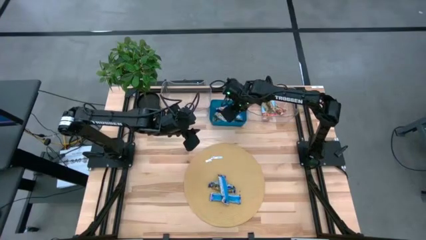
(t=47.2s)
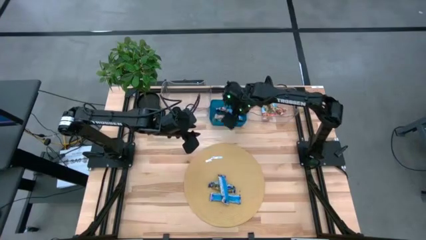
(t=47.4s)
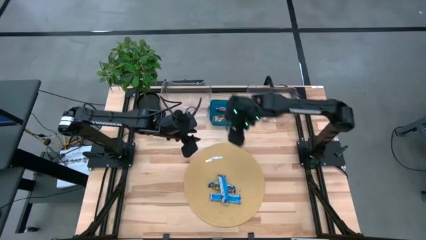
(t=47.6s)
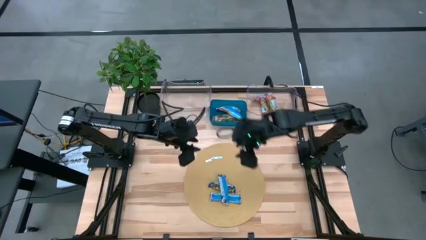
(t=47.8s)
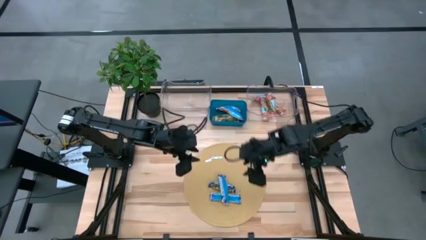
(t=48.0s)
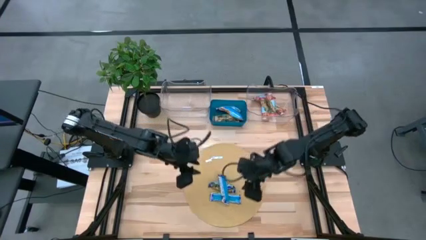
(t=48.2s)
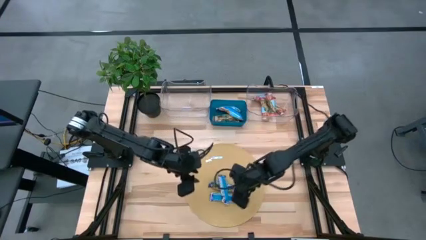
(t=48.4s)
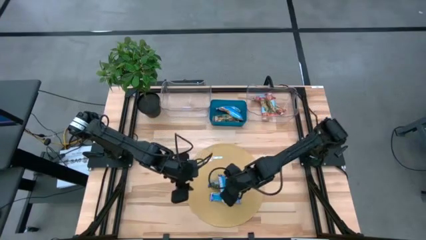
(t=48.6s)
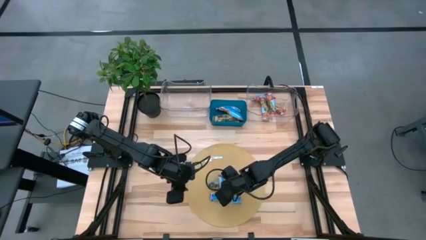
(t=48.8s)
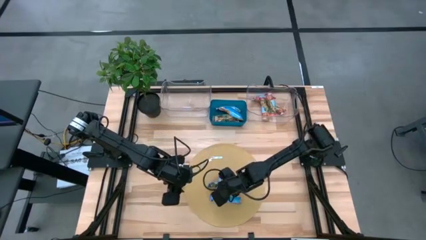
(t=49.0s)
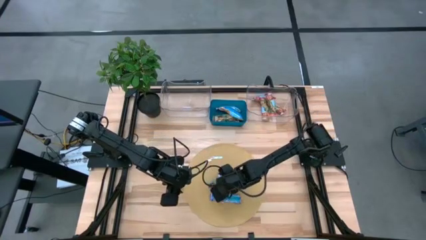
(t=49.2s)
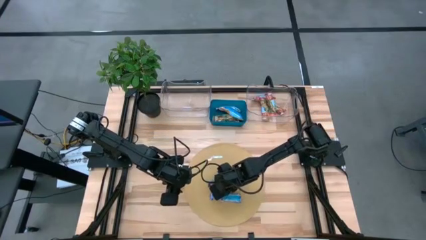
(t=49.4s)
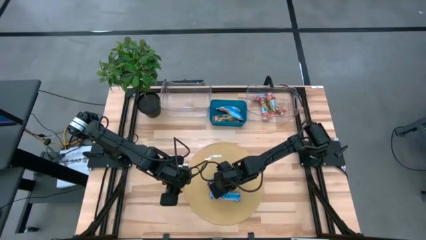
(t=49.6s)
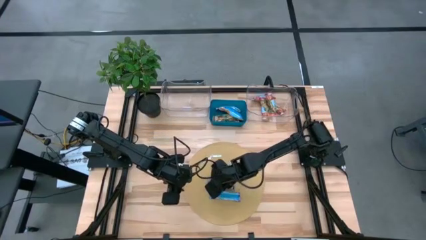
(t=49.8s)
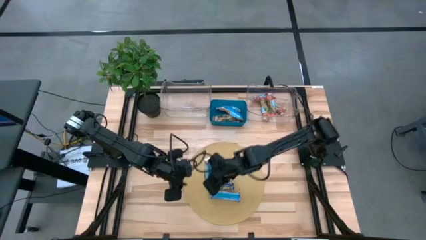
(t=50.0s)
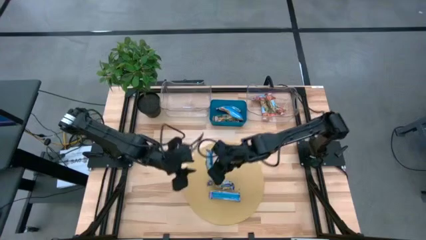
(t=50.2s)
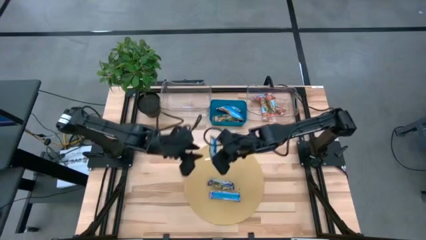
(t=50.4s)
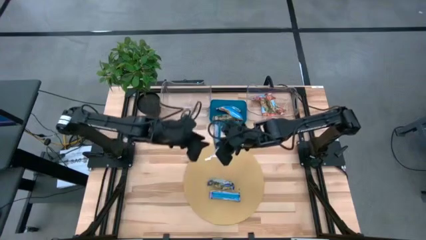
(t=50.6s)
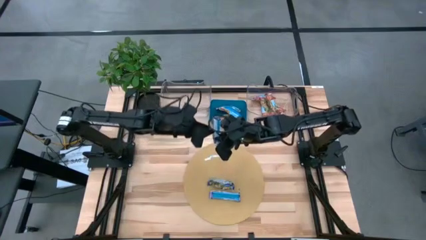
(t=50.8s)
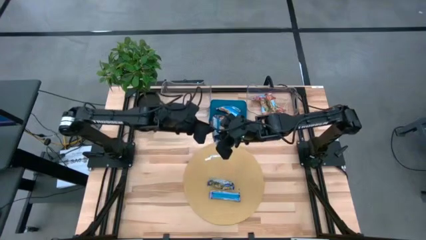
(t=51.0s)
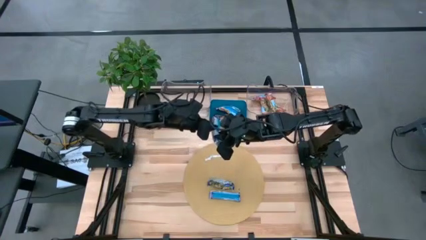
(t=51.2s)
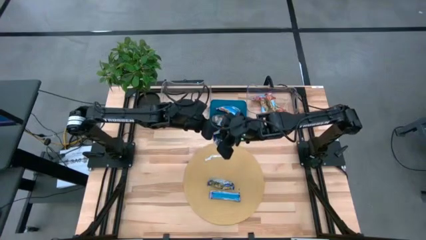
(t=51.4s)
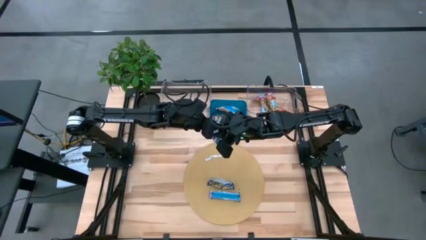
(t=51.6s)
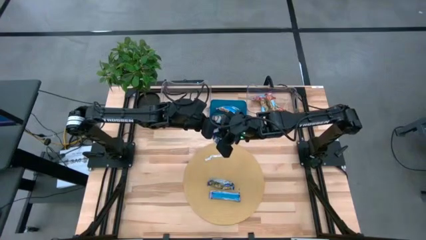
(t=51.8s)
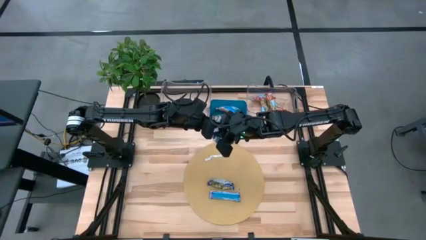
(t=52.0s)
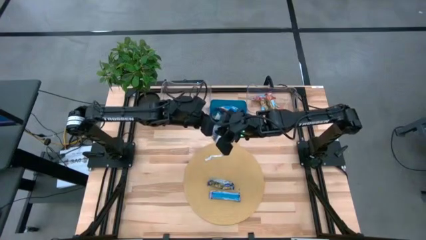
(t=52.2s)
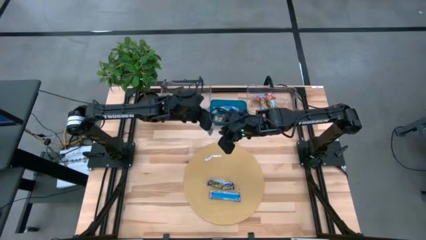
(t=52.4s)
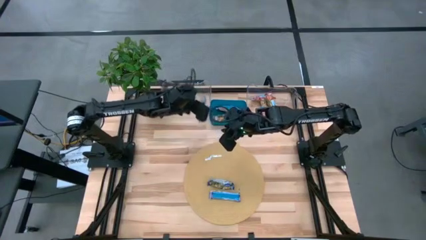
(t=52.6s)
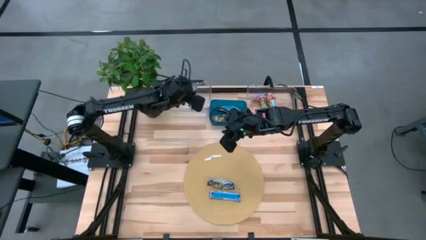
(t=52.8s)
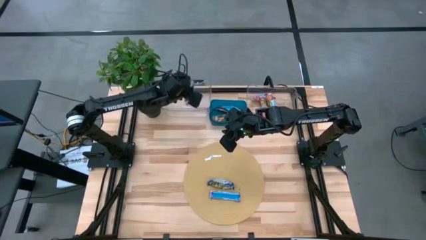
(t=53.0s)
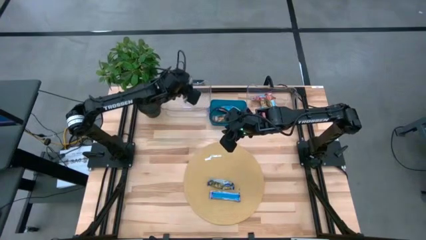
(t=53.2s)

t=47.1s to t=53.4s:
Task: Pick and place Granola Bars by type
Put the blue granola bar into the left transparent bin

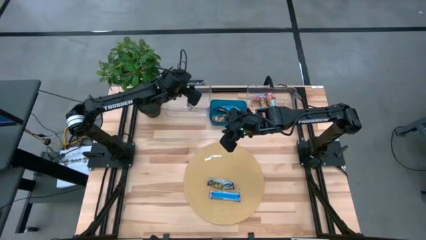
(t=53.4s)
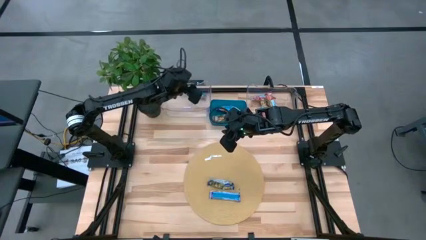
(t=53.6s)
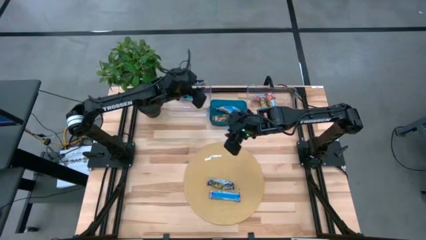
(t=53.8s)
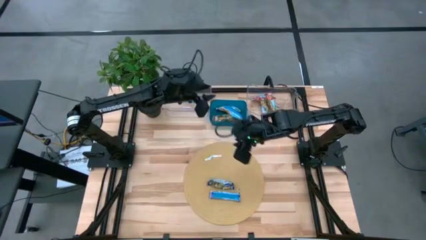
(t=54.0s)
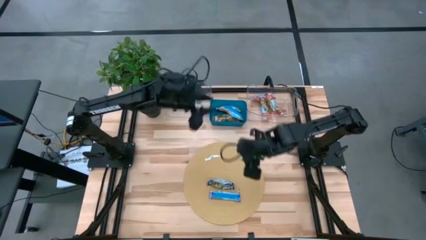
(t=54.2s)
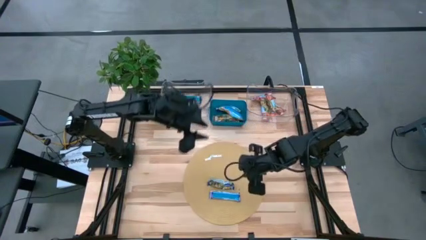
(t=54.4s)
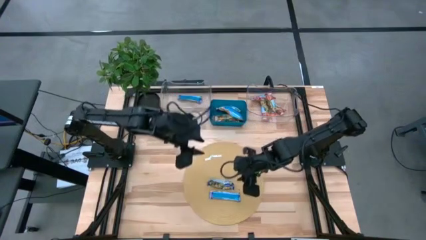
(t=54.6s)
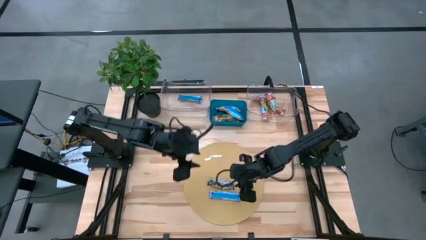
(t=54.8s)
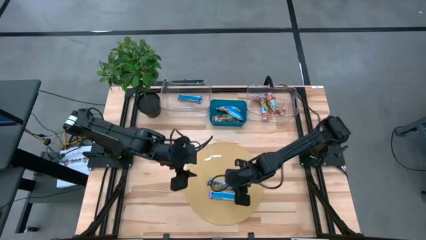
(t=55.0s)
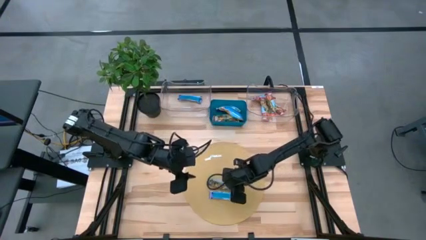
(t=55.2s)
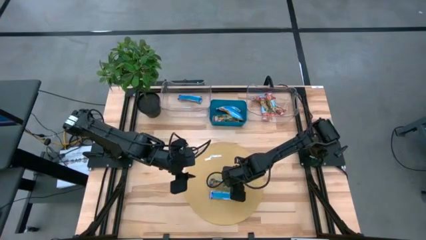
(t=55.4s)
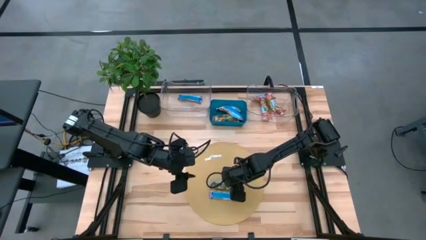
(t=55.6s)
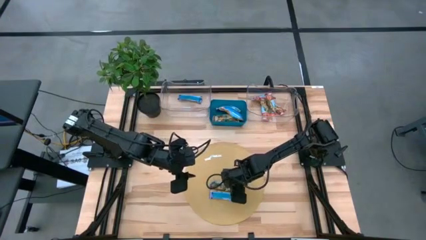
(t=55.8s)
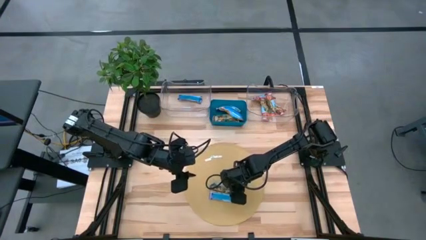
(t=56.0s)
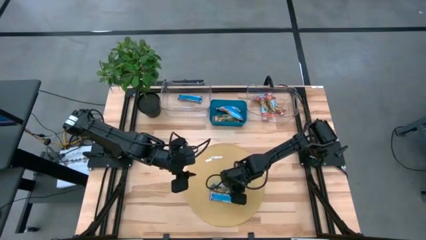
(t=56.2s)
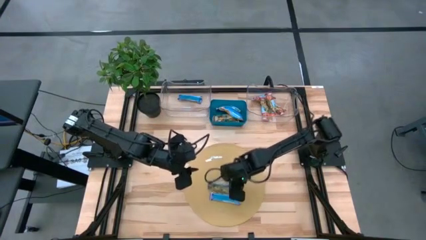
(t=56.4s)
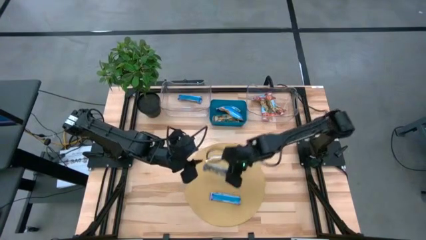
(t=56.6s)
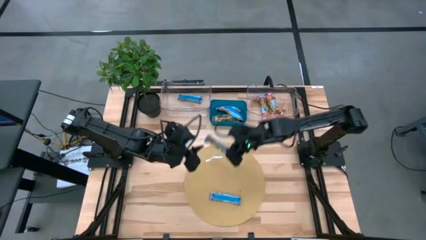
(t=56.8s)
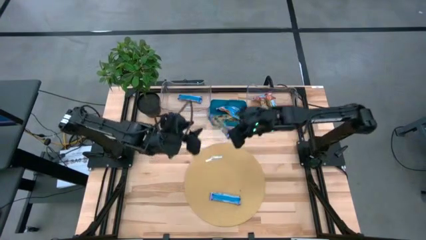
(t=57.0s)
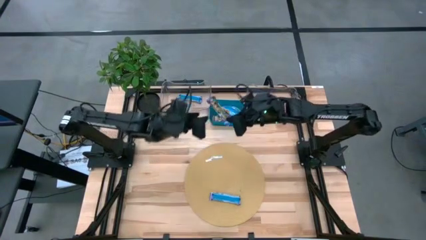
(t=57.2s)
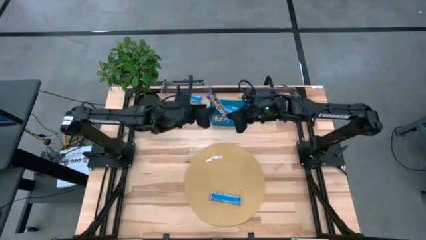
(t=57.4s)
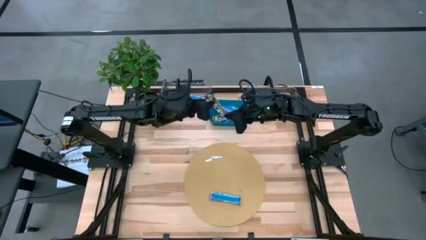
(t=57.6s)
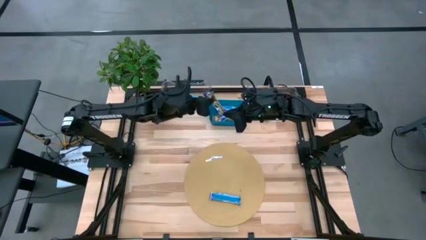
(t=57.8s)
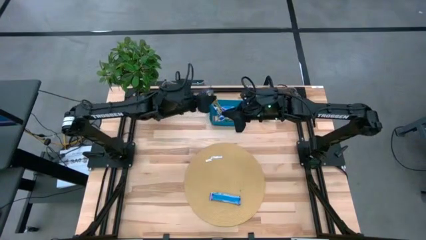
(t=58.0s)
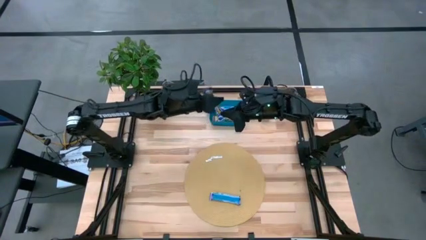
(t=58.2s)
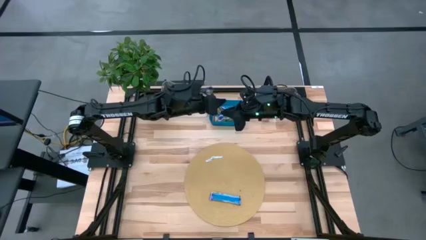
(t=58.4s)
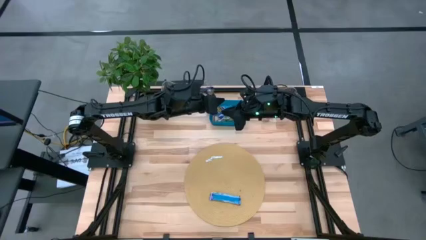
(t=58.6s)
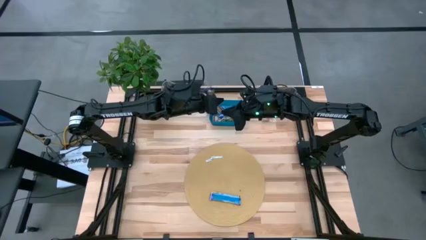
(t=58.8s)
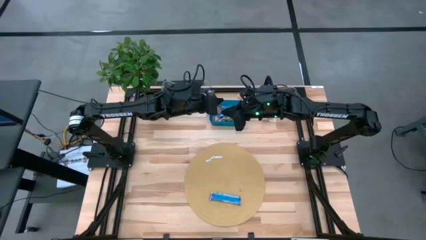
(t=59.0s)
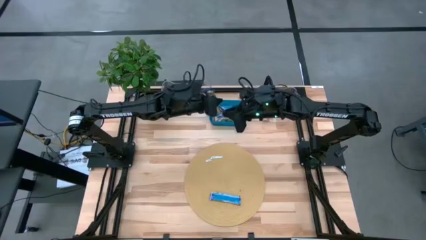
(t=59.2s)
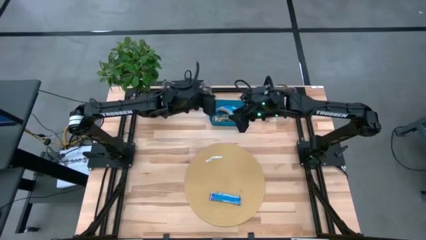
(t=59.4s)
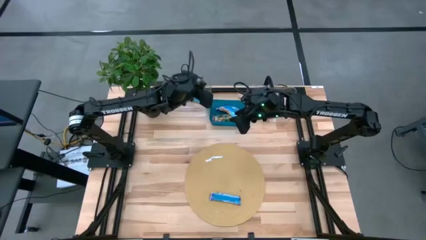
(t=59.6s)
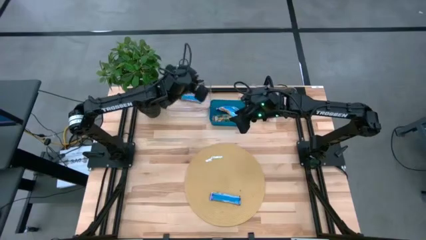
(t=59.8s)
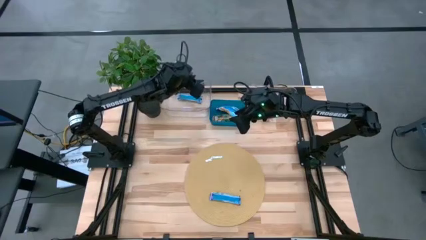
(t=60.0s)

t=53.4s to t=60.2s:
Put the blue granola bar into the left transparent bin

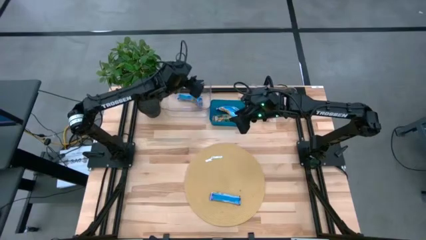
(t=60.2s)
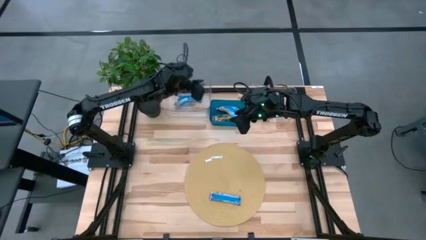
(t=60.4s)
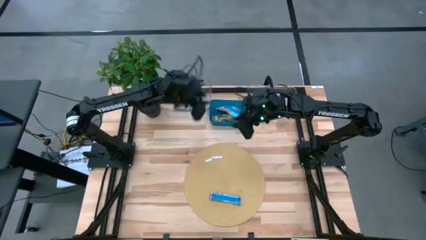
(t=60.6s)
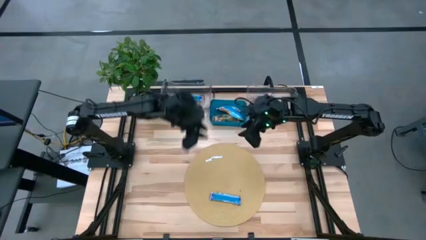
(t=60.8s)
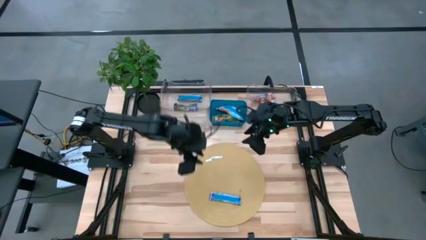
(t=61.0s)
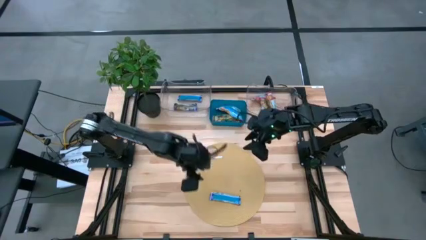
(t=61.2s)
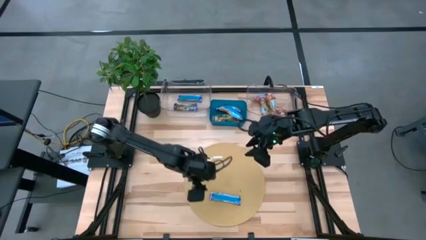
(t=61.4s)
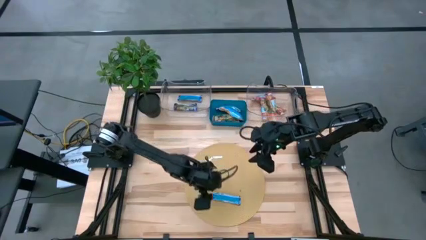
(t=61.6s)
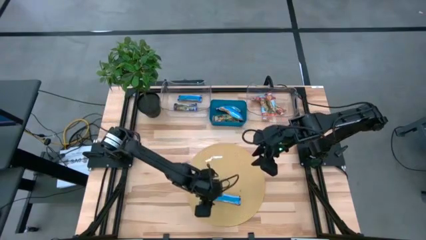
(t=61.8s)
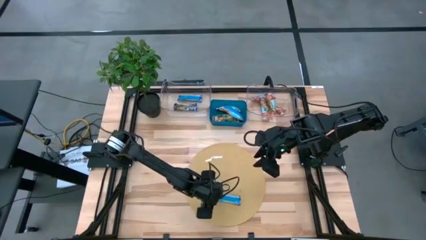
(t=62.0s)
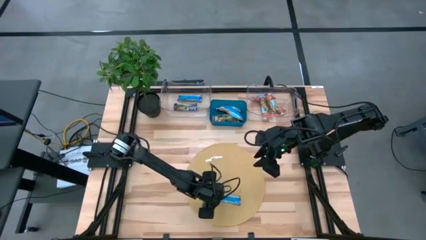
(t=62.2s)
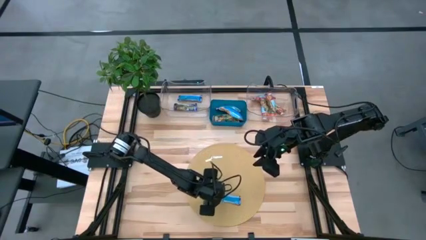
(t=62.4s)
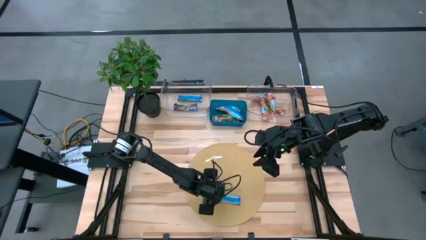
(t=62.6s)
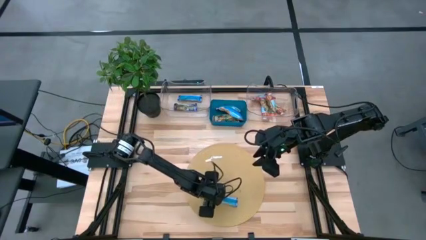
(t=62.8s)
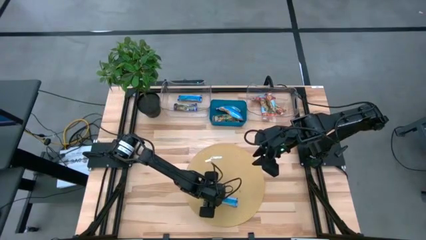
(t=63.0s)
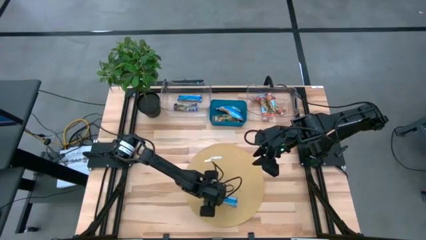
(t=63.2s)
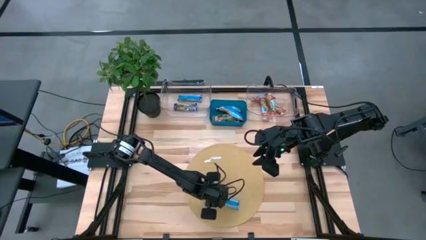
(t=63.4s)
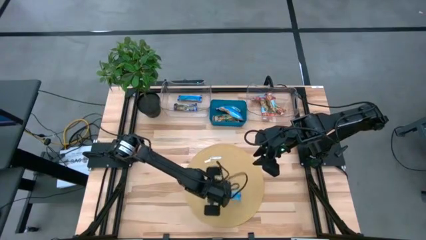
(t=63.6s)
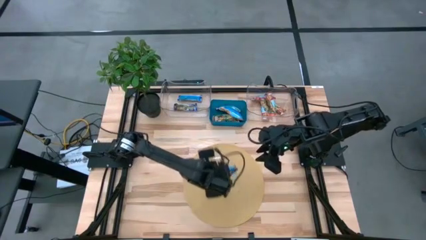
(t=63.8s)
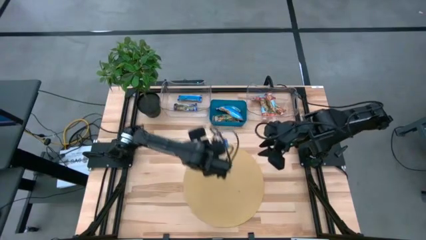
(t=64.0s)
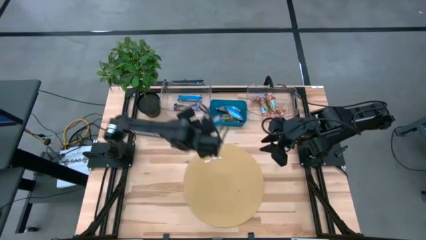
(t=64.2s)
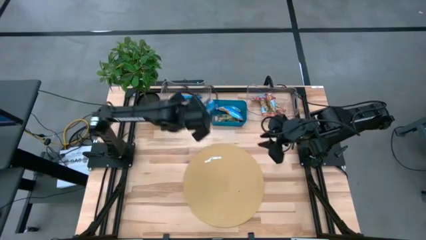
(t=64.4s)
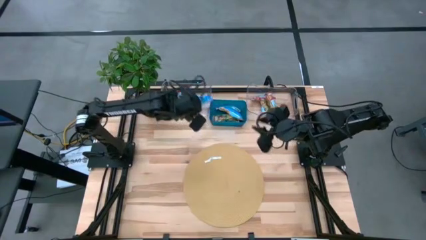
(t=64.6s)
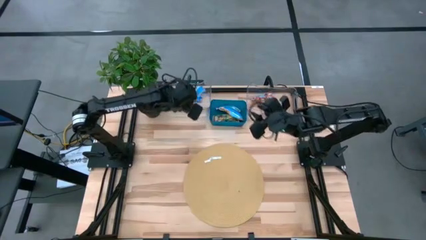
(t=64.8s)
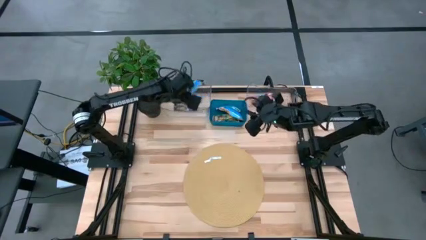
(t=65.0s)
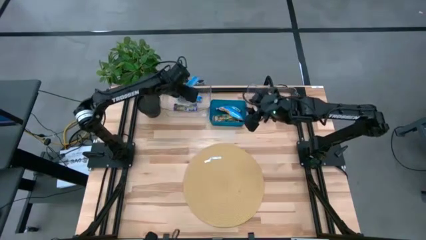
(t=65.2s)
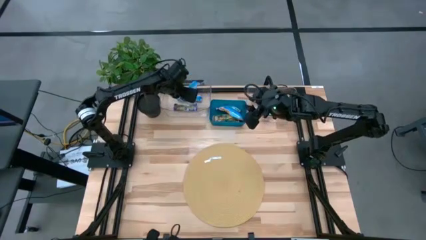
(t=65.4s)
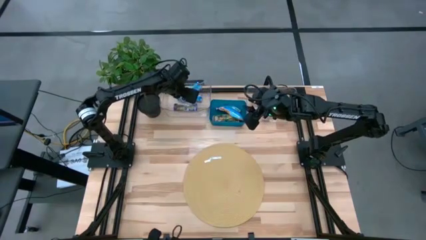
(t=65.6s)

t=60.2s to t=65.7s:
Put the blue granola bar into the left transparent bin
